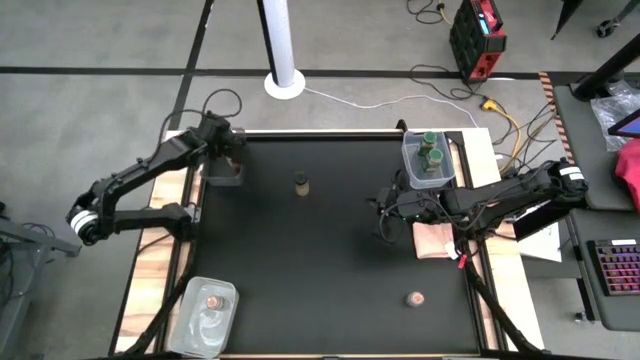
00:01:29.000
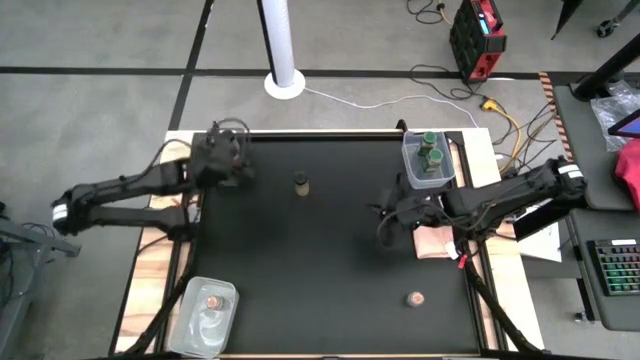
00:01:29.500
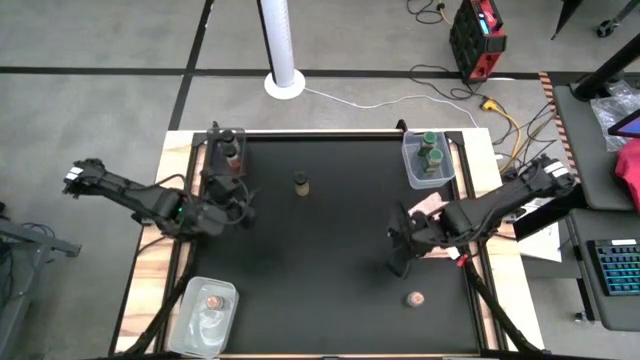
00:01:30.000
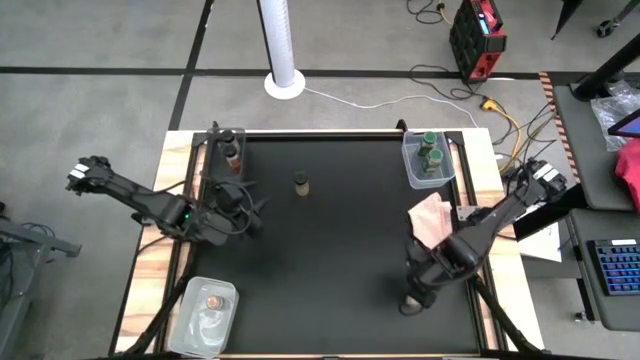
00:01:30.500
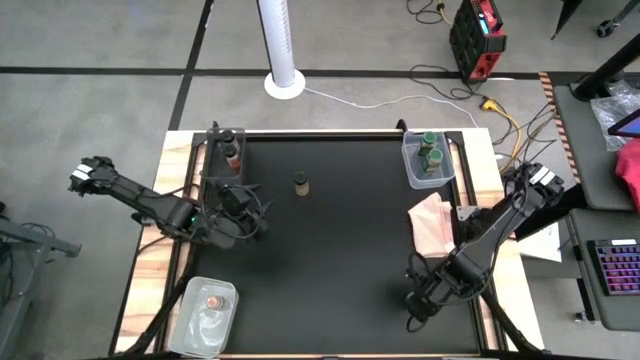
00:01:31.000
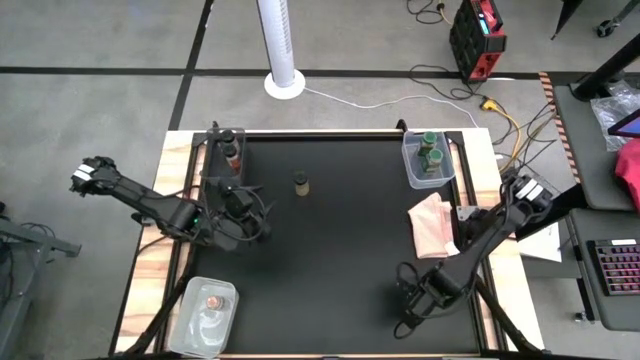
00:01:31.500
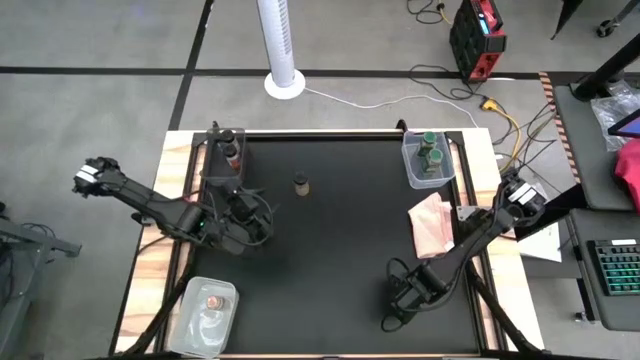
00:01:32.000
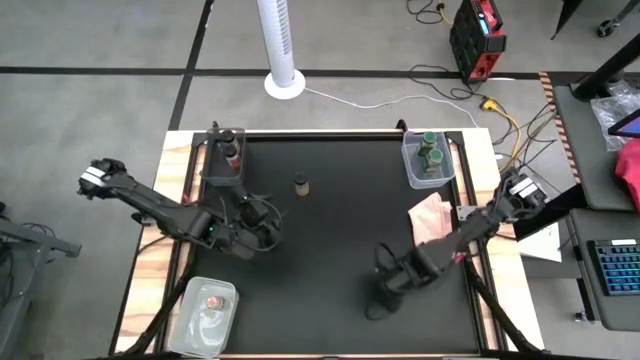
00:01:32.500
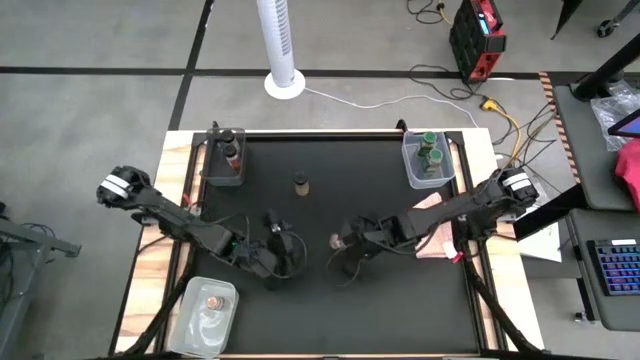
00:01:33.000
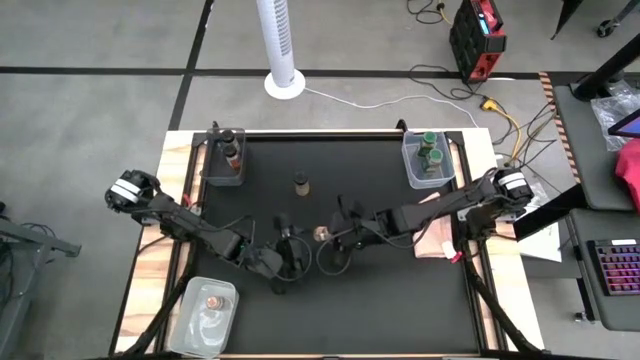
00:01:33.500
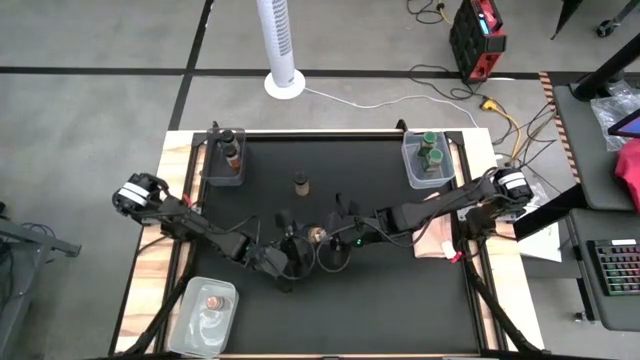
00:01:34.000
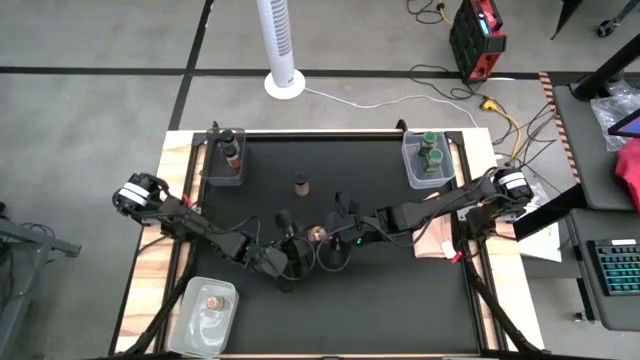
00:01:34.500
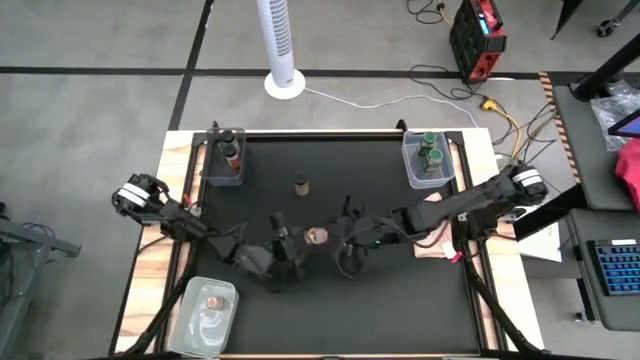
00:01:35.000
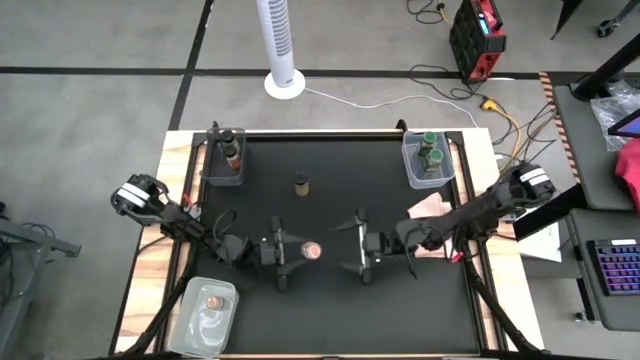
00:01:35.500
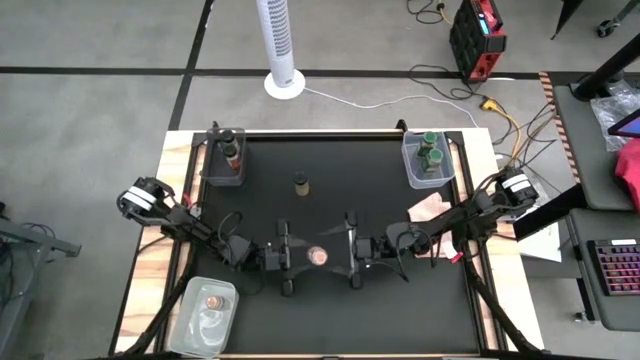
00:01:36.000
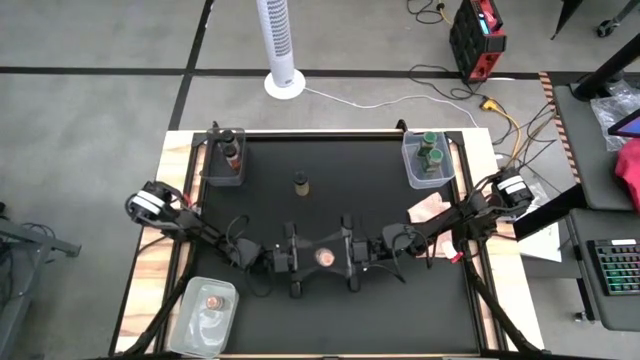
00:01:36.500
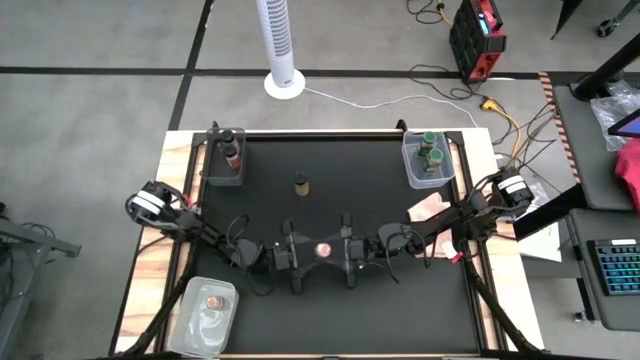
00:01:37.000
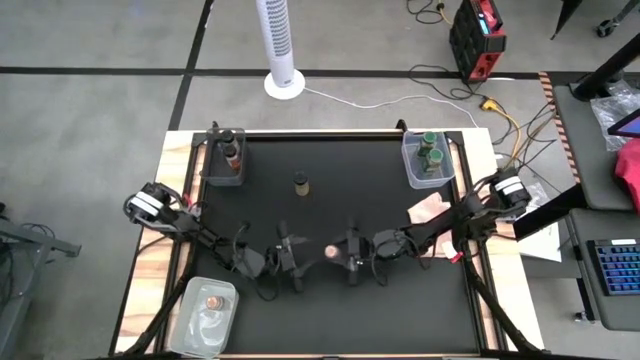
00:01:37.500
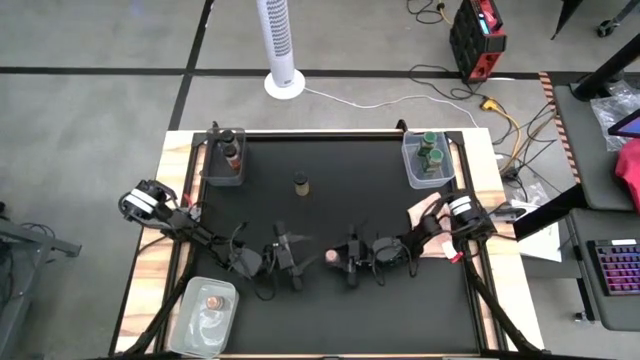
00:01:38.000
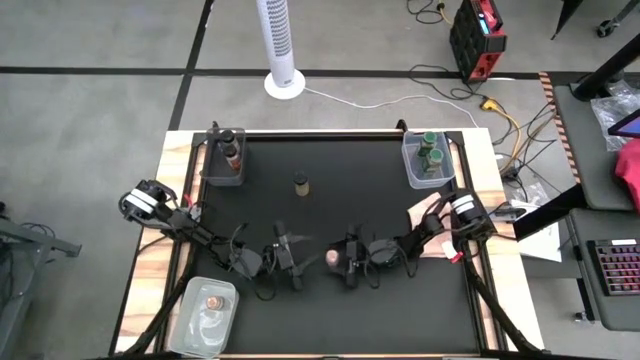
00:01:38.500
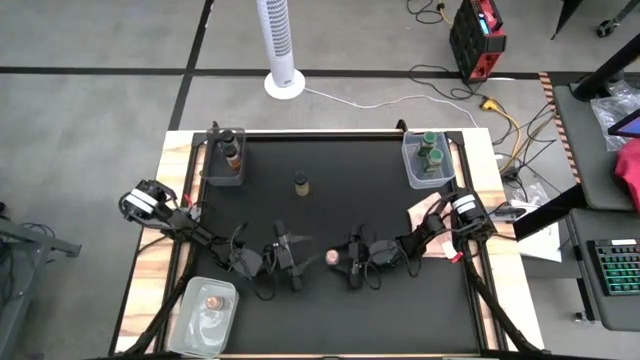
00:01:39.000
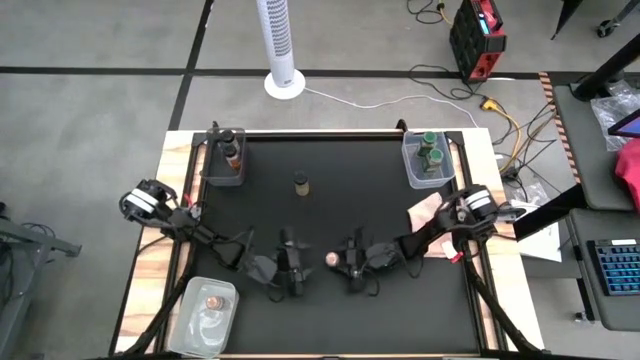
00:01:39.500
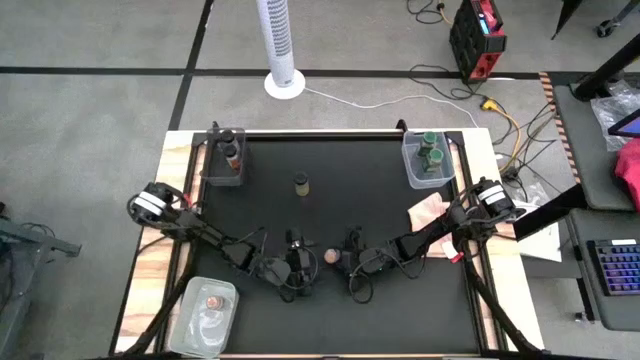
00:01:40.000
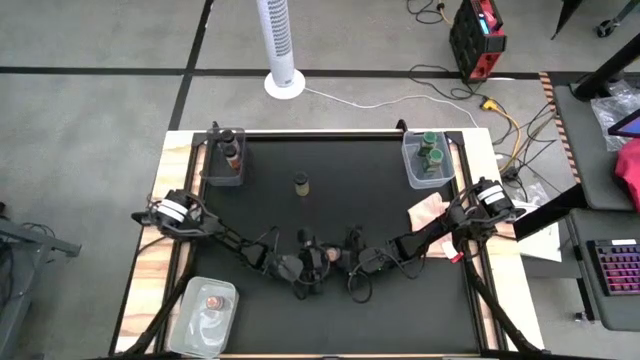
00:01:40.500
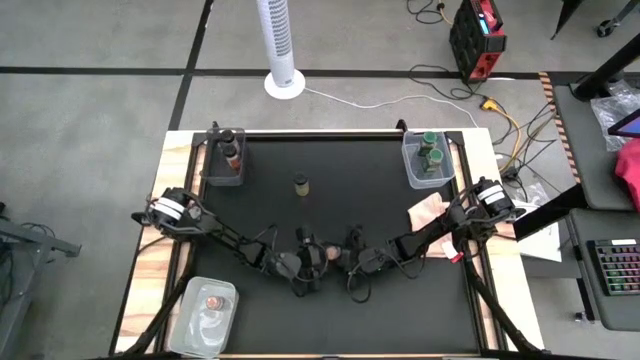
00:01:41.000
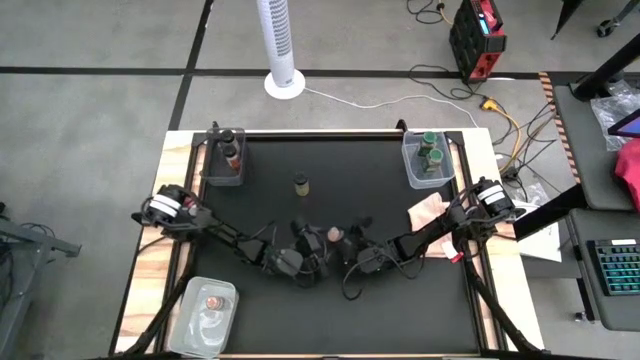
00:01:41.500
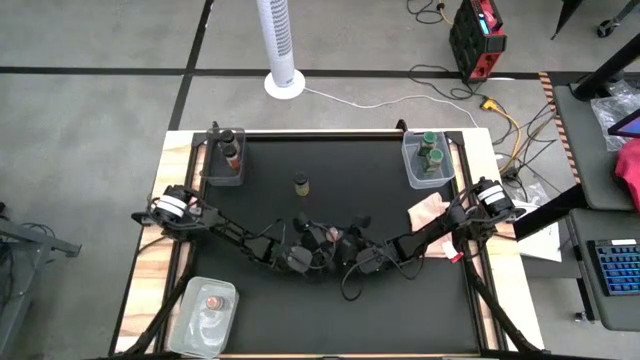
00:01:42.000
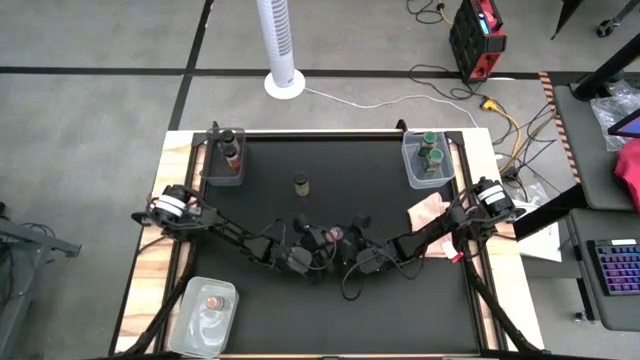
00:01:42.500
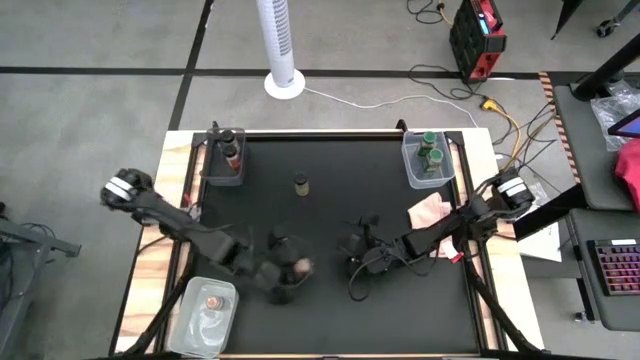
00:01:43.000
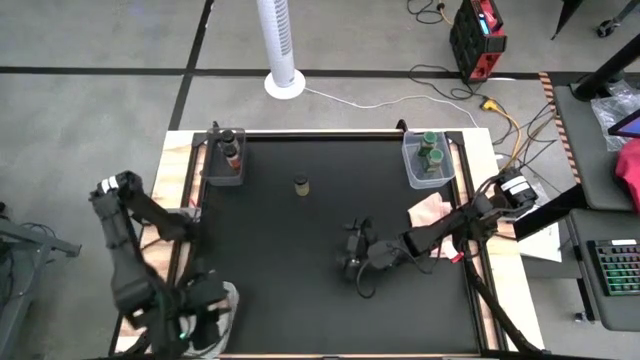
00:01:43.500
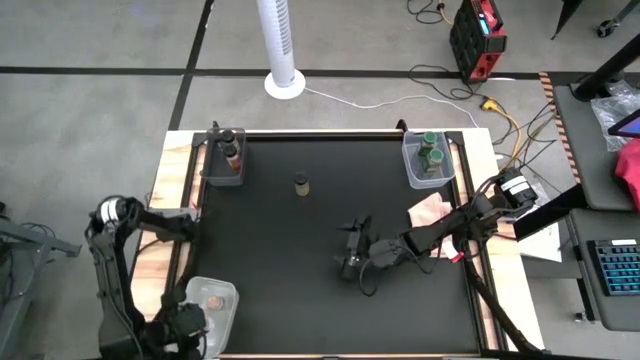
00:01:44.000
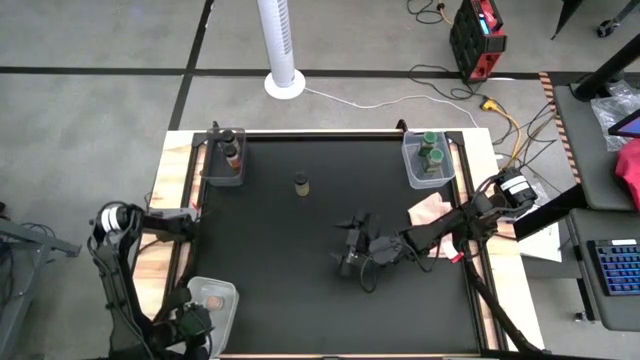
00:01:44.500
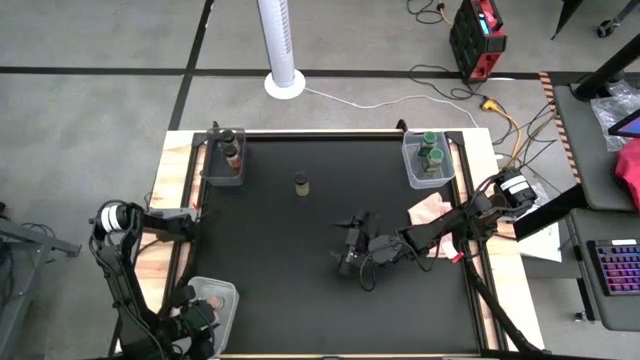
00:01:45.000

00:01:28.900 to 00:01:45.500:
Task: Sort spices by type
Put the brown spice bottle into the white bin

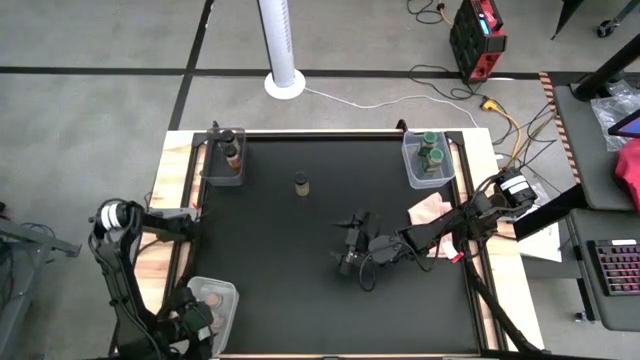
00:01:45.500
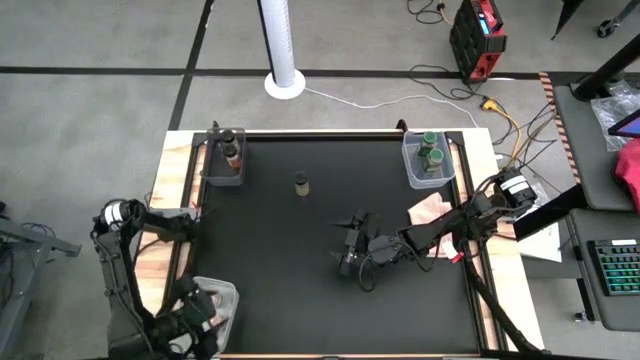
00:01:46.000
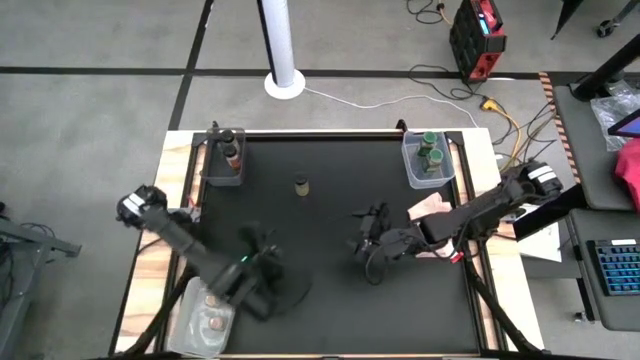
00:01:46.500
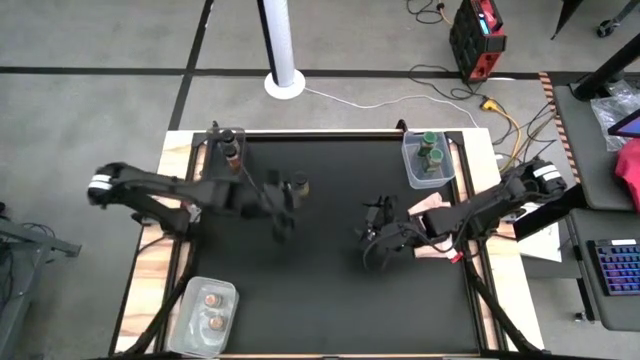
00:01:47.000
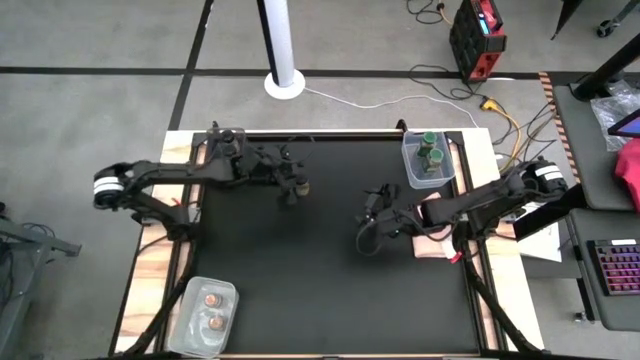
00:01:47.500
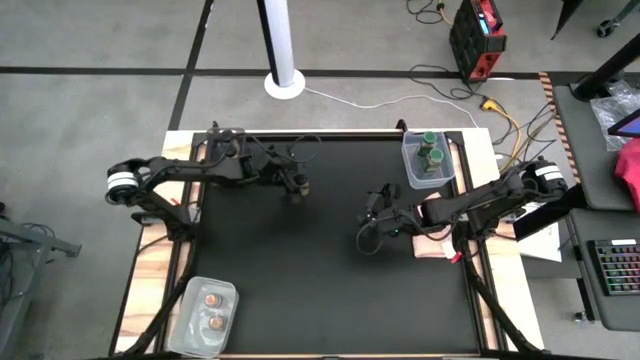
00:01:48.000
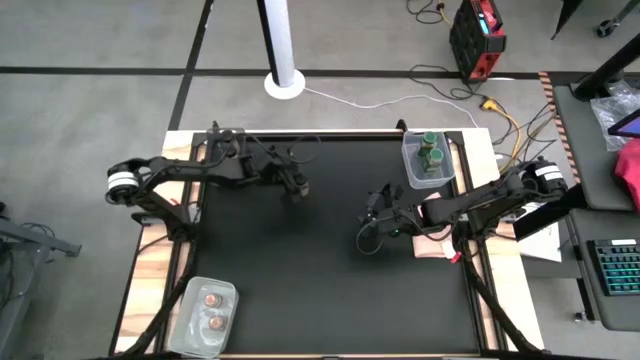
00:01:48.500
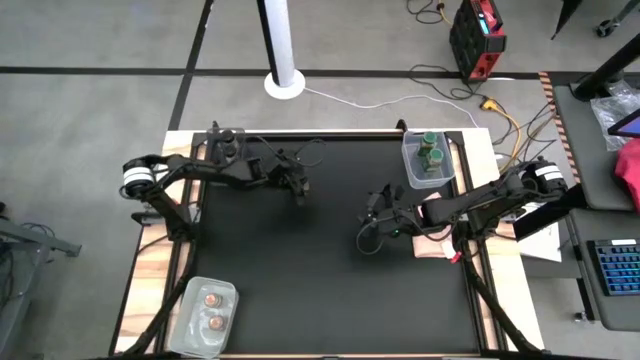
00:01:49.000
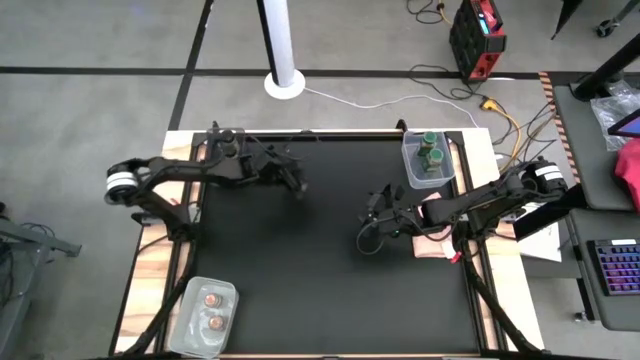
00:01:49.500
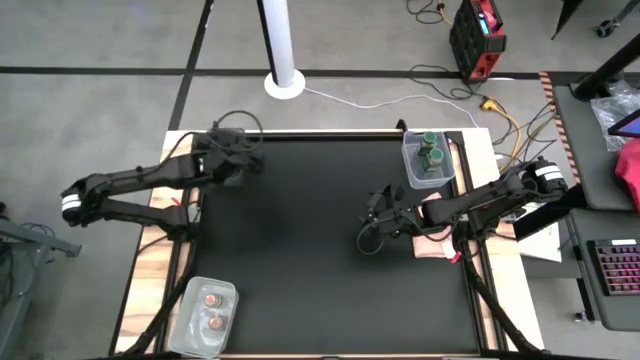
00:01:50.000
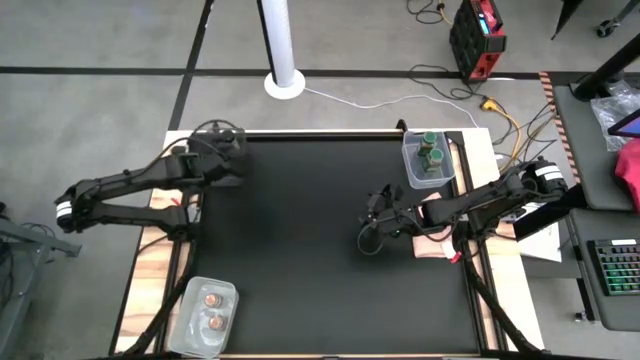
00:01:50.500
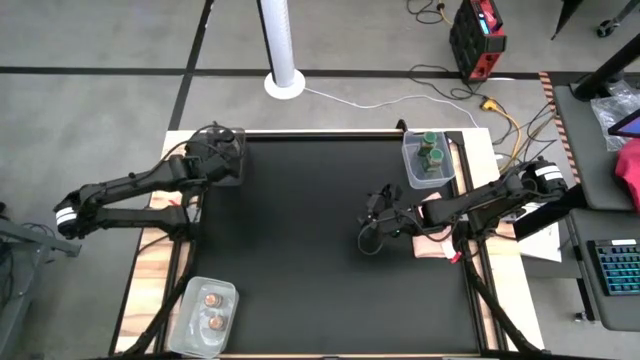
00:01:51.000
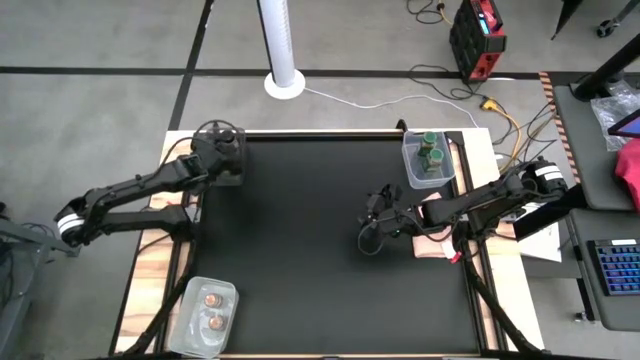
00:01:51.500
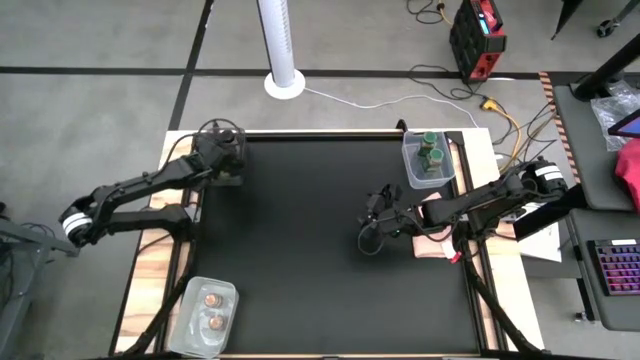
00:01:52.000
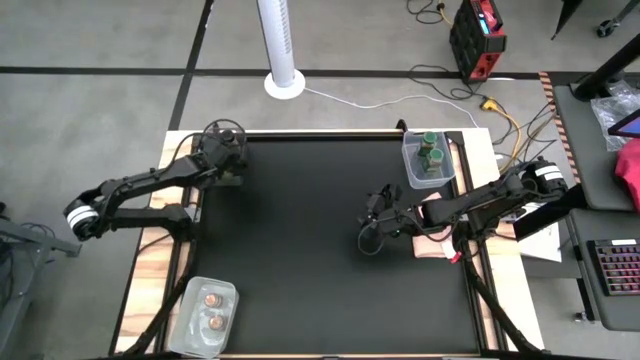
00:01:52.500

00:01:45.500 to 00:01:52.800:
Put the black spice bottle into the black bin
